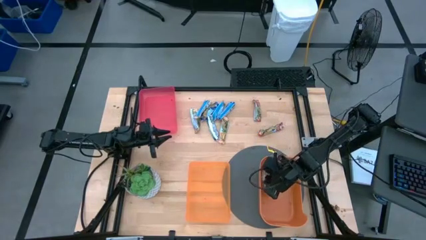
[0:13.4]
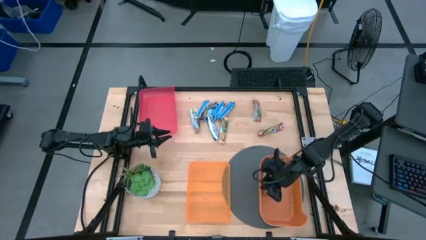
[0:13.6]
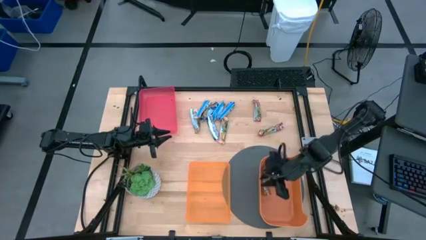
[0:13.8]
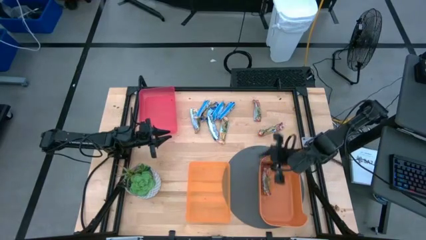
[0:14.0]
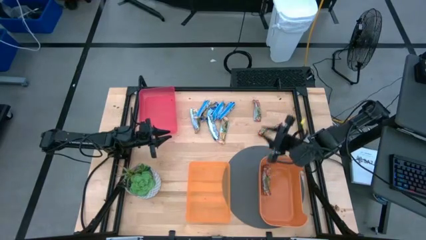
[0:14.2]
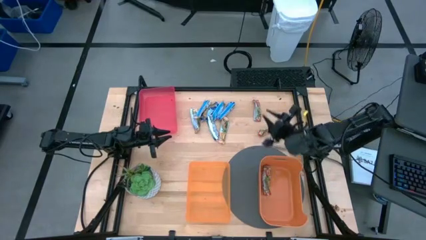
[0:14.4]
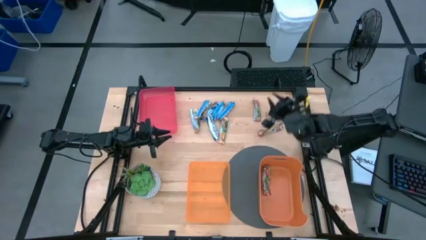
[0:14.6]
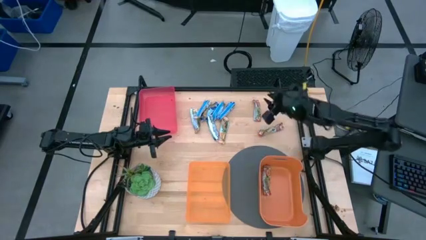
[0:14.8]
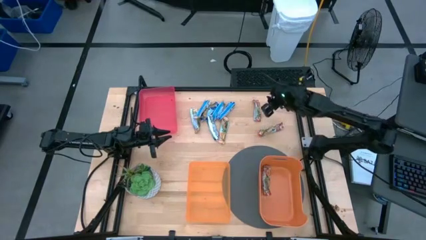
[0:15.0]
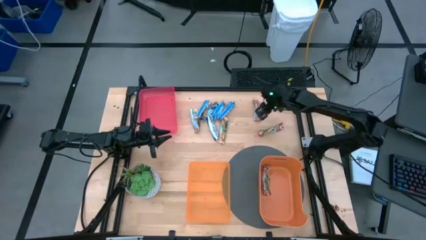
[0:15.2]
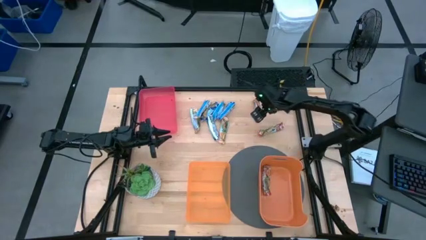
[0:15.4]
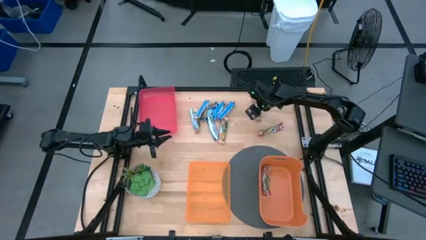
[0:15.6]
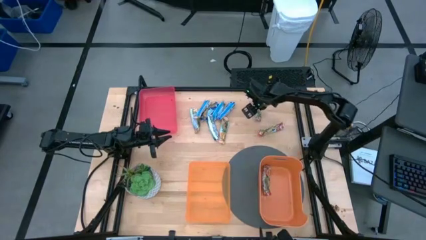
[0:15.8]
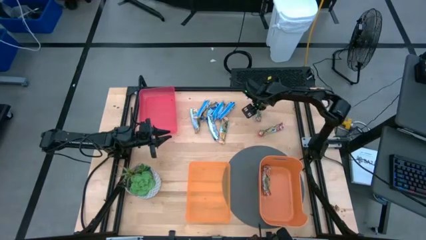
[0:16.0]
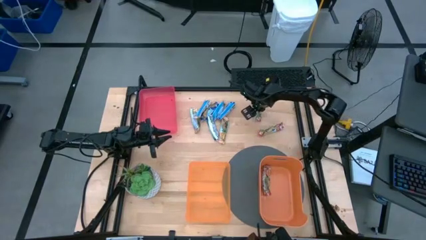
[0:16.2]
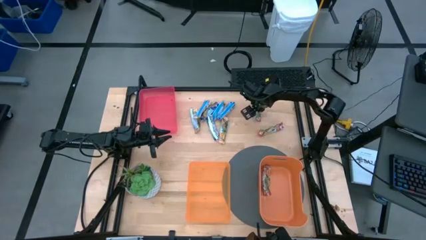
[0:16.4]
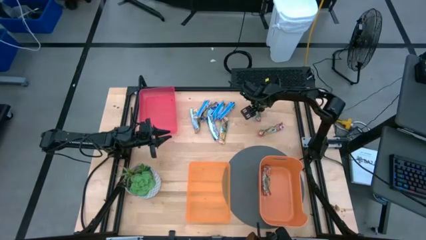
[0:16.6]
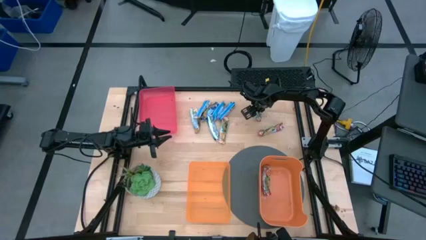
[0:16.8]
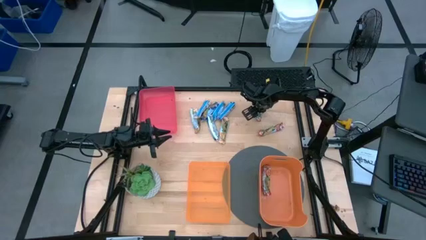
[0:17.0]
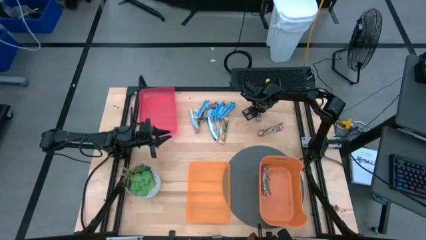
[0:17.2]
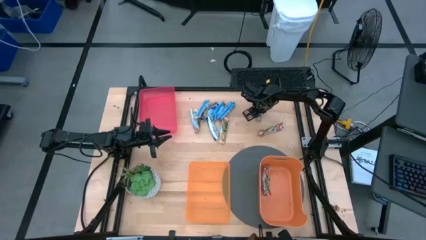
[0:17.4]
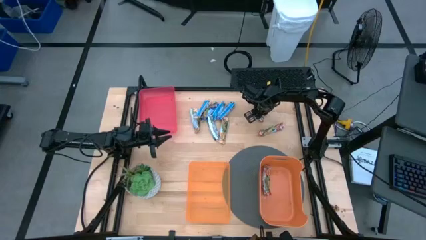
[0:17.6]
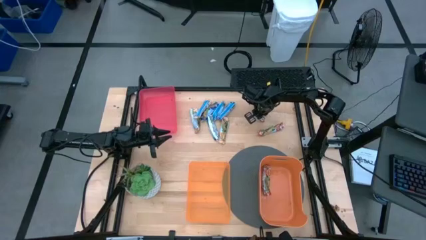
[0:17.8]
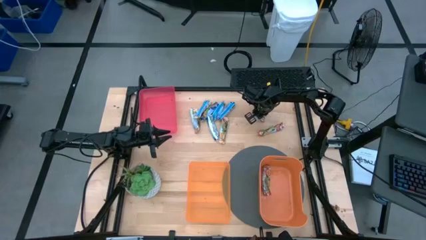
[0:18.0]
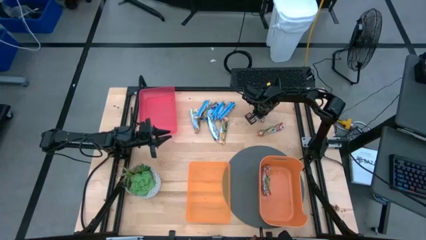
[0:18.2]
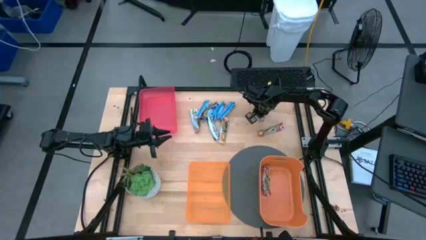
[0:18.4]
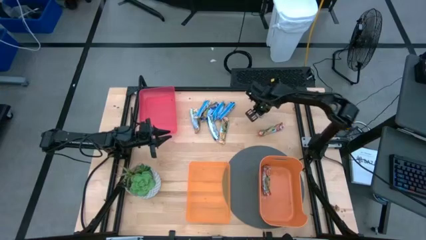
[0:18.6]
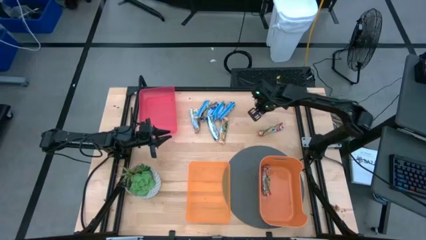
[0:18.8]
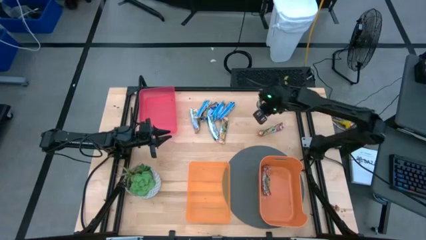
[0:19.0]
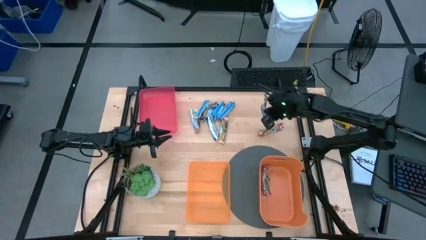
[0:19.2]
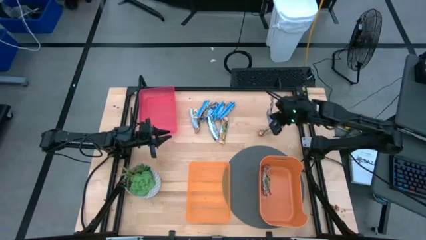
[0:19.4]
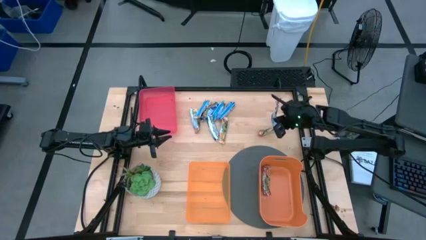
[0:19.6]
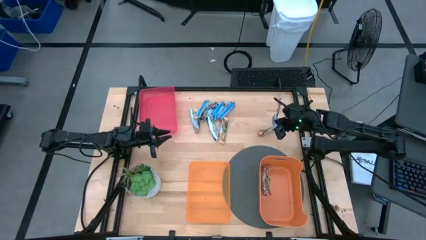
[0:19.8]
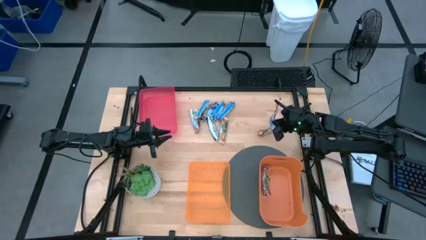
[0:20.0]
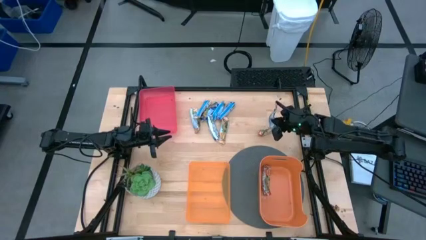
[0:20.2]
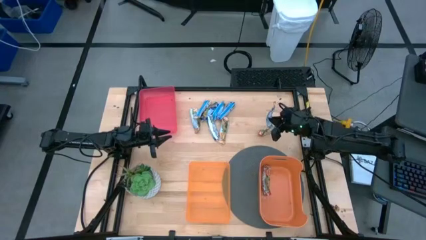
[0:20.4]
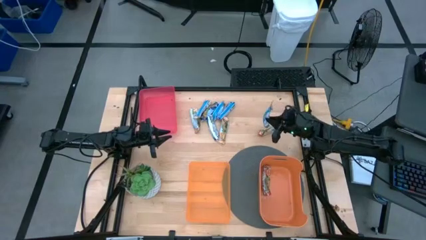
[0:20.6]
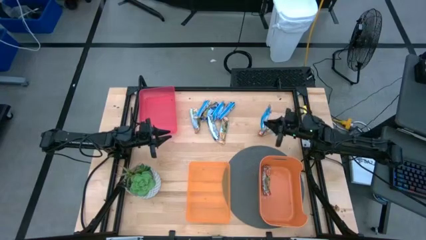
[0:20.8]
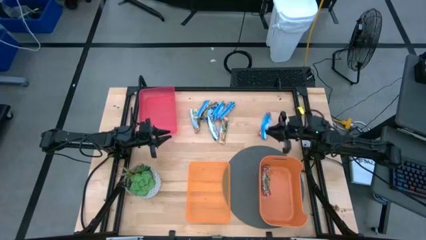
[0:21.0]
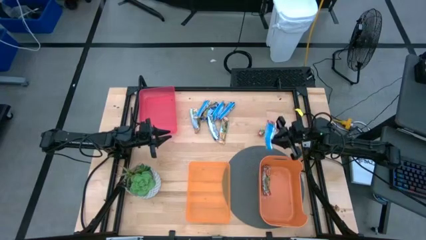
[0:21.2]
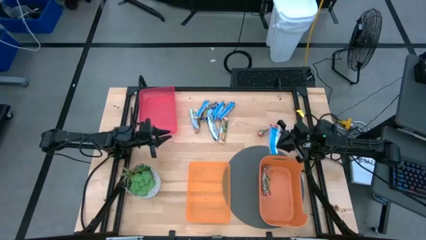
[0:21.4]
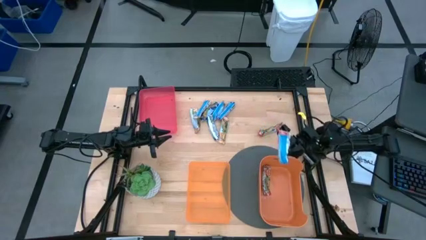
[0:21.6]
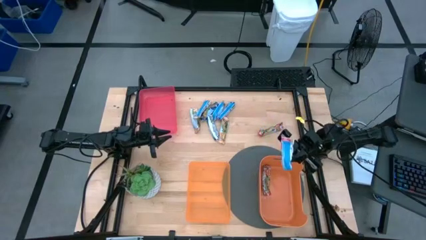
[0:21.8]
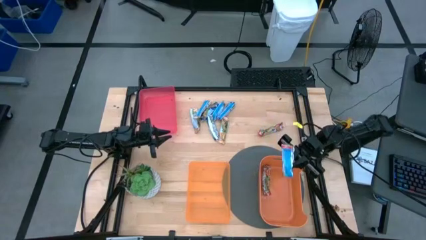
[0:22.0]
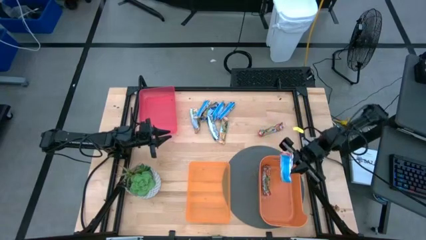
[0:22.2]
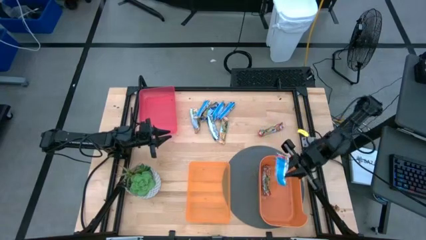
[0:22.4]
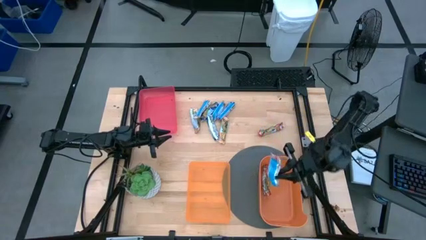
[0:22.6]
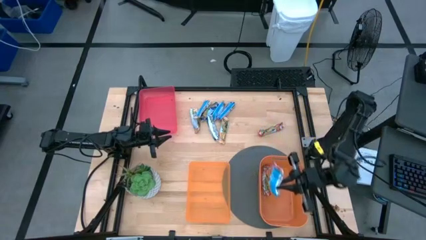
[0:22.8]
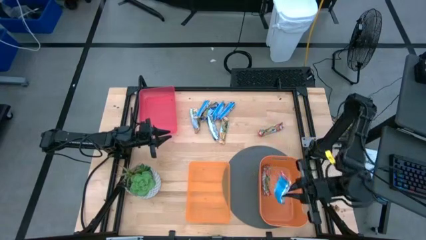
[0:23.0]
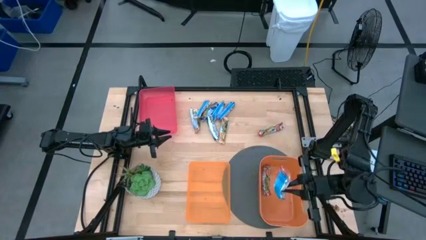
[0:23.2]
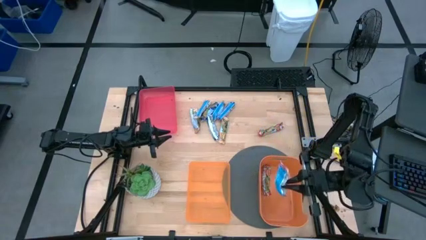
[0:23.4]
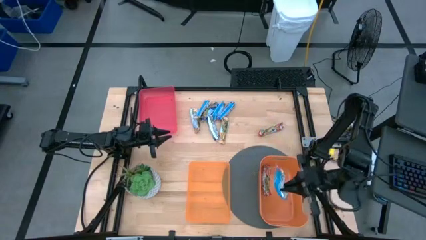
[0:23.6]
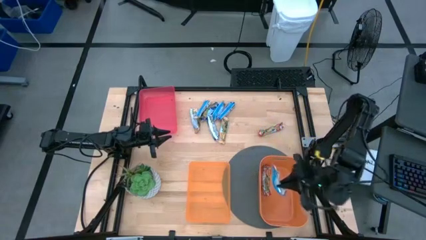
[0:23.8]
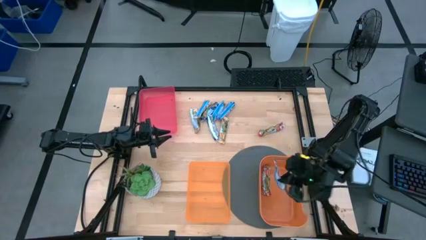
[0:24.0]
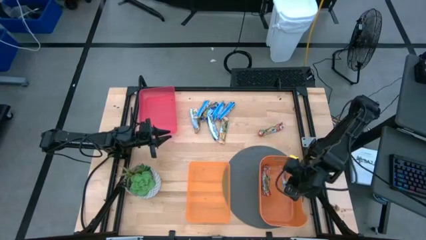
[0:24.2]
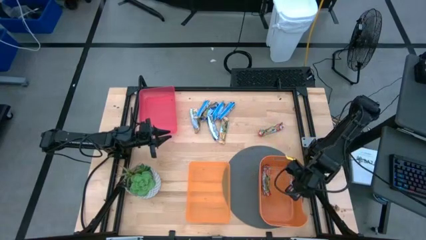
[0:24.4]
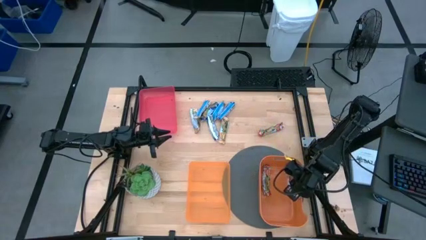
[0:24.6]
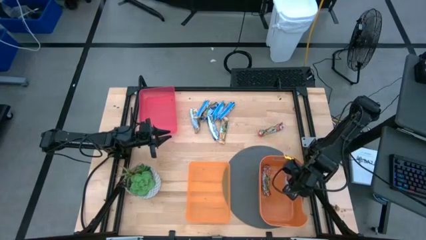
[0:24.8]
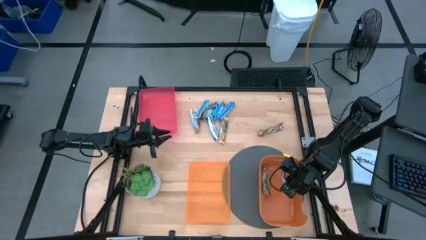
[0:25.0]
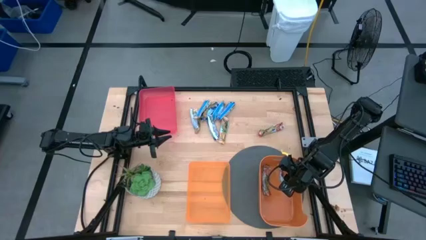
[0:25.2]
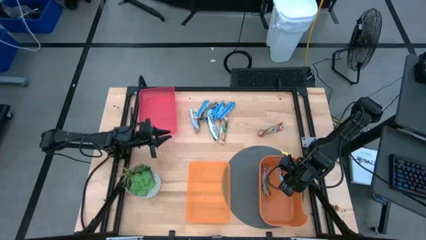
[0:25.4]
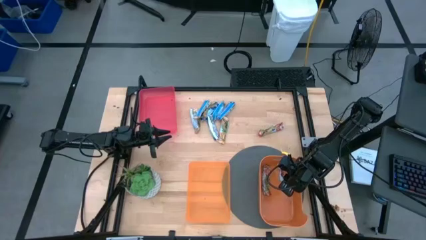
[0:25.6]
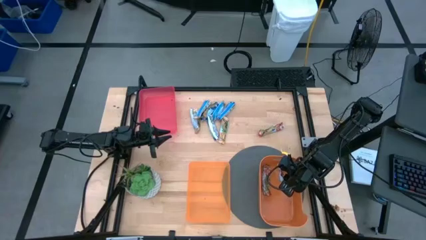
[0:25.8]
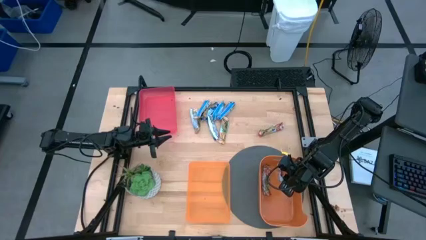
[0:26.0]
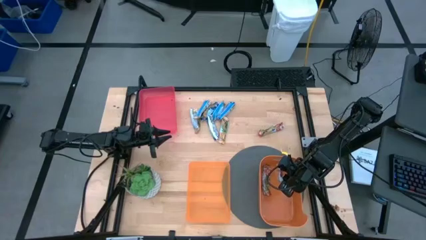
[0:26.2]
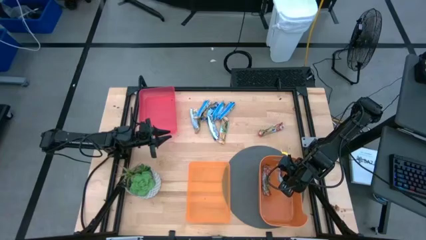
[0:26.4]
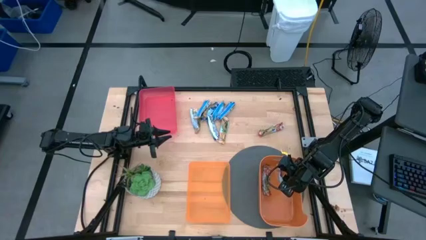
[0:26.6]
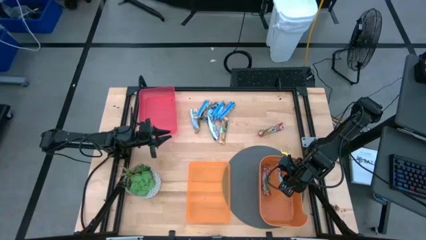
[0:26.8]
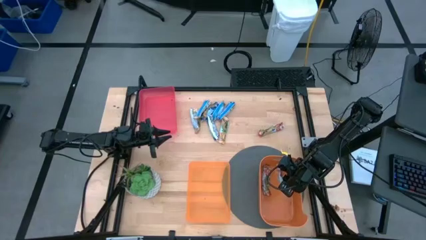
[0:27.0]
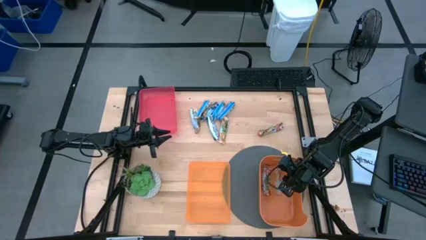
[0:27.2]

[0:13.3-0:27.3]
Task: Pick and place Granola Bars by type
Put the top orange granola bar into the right orange bin

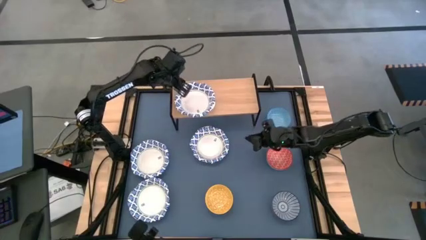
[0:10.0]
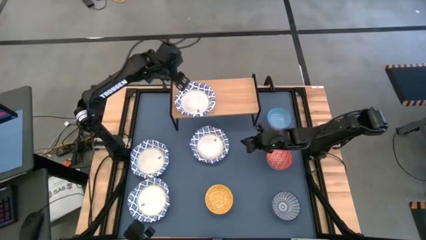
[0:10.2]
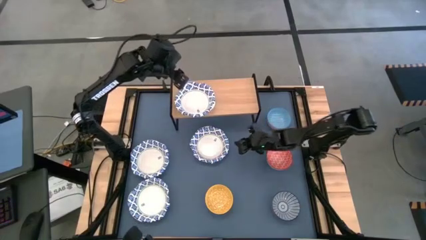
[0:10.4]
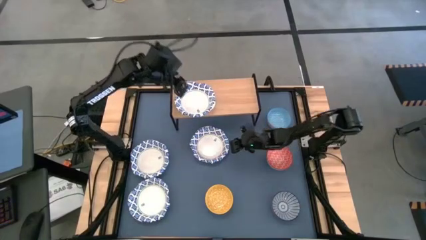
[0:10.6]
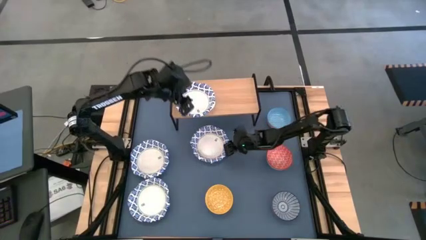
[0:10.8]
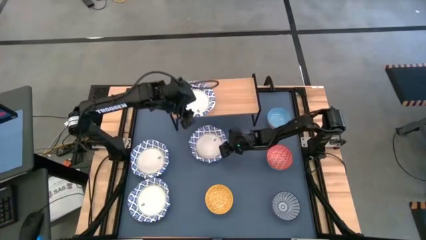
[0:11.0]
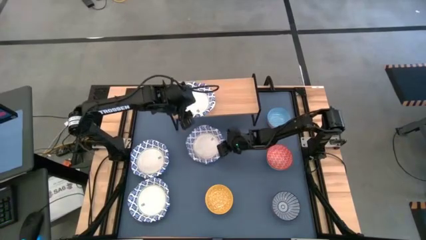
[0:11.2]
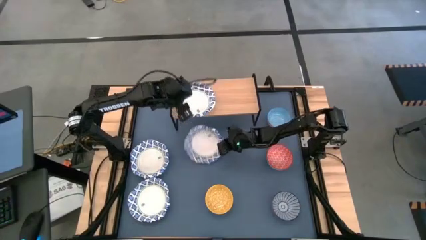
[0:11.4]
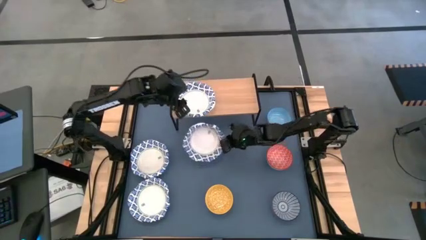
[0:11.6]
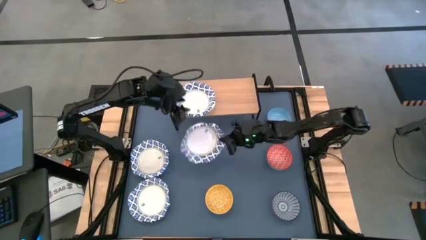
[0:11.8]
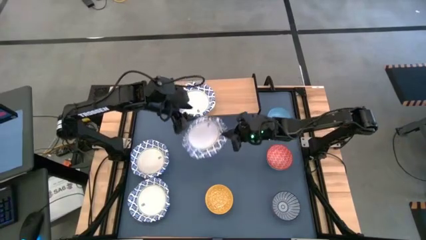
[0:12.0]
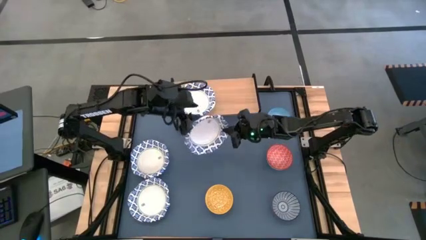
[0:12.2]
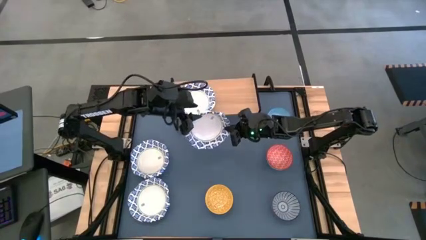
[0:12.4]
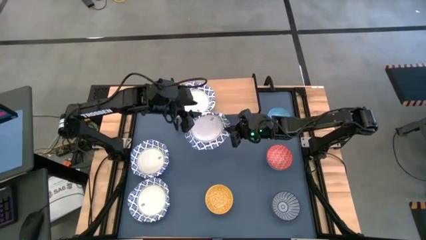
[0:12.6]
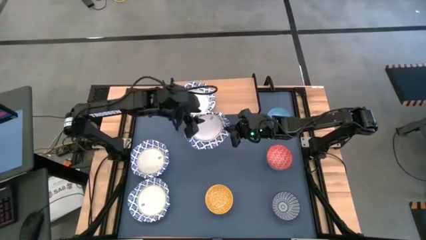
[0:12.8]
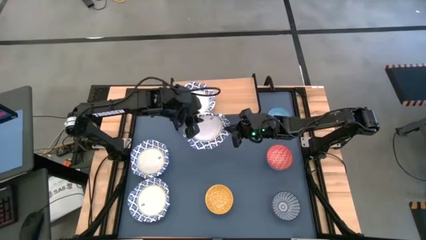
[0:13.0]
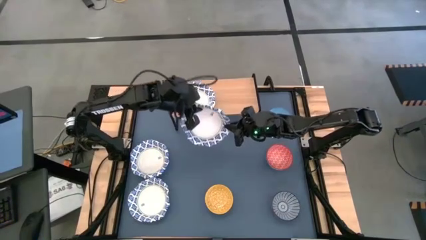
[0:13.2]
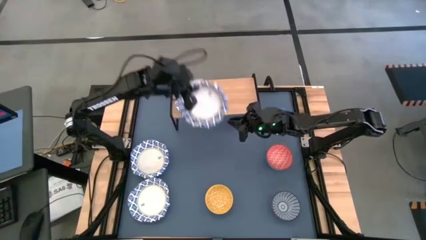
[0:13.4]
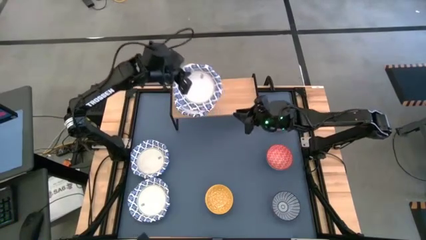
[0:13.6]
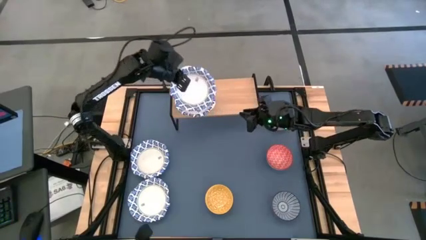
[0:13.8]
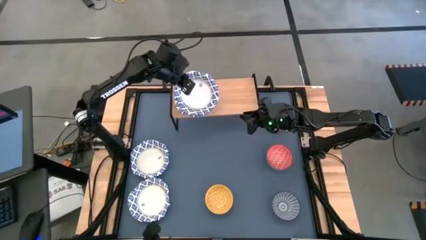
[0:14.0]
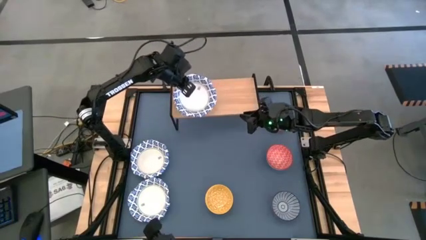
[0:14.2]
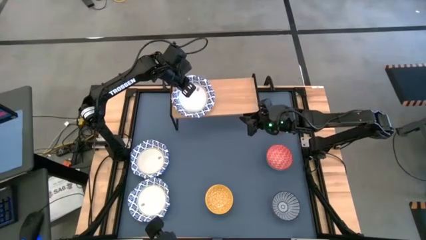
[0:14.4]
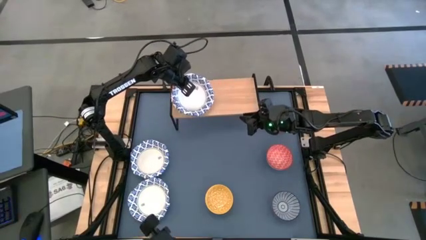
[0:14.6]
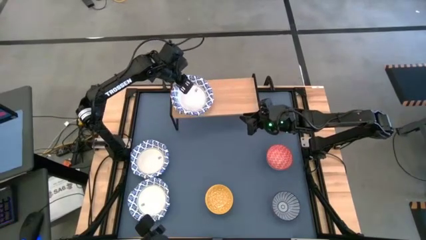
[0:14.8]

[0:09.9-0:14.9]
Task: Place and stack bowls onto a shelf
Stack the white bowl on top of the white bowl on the shelf
